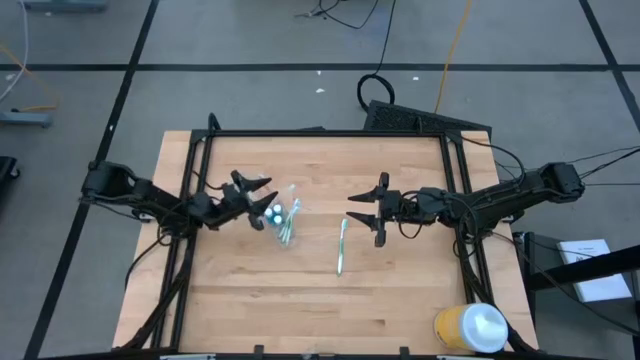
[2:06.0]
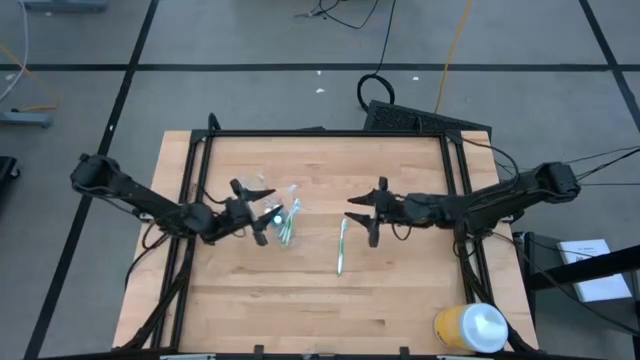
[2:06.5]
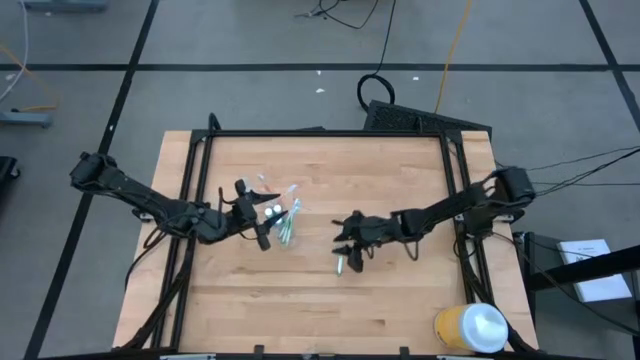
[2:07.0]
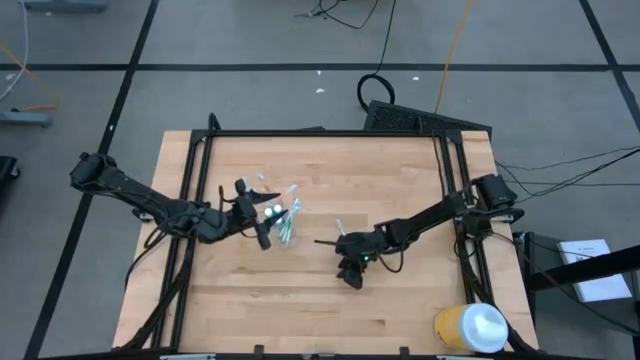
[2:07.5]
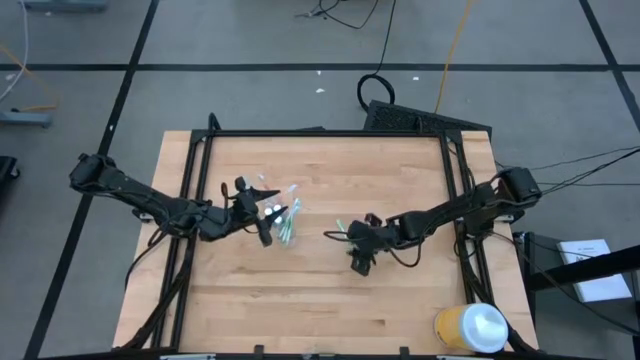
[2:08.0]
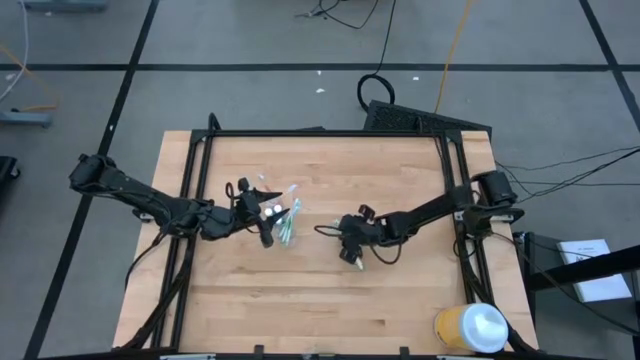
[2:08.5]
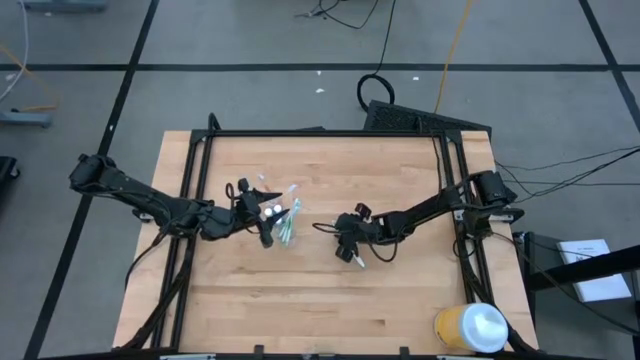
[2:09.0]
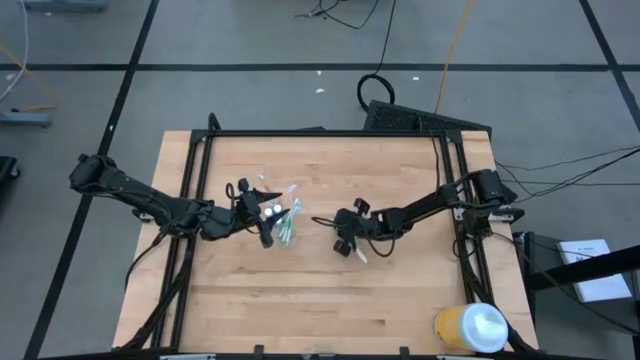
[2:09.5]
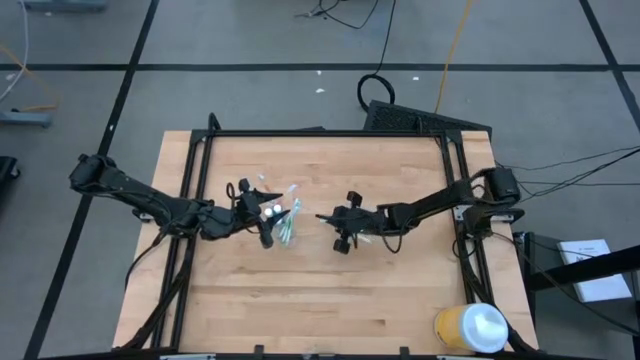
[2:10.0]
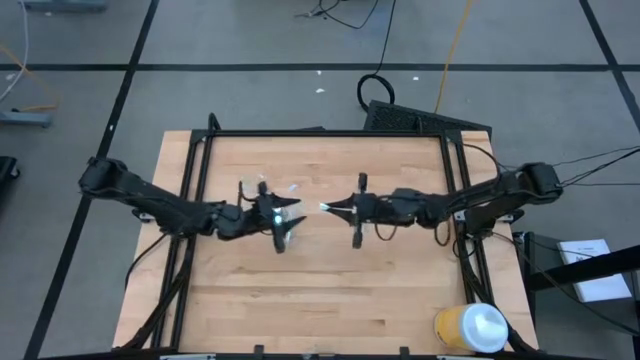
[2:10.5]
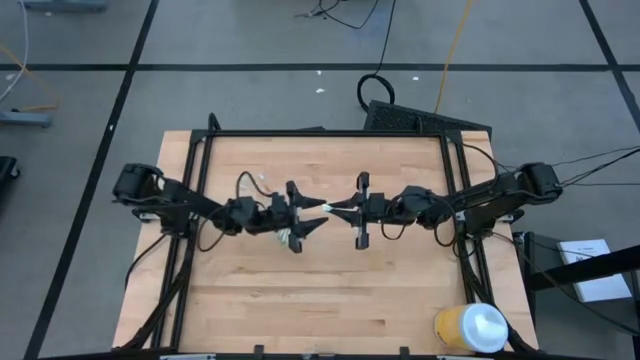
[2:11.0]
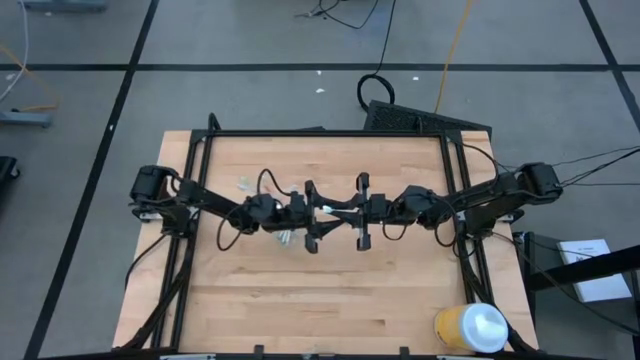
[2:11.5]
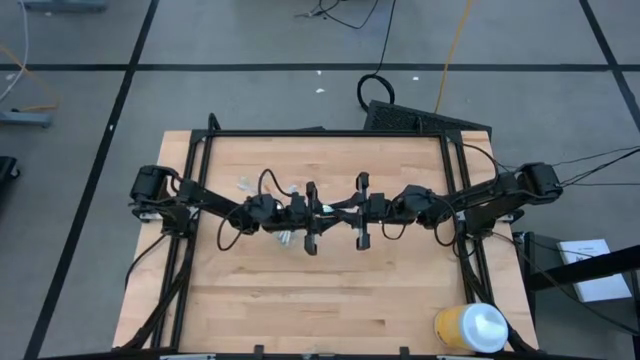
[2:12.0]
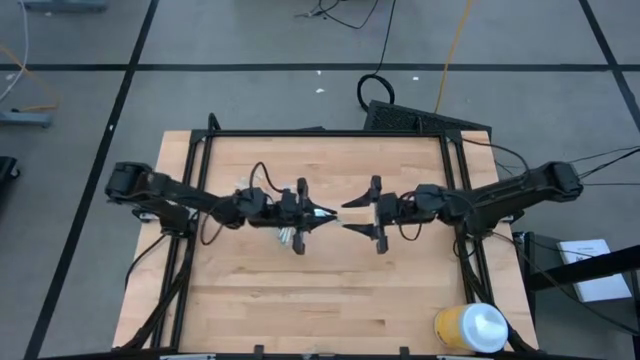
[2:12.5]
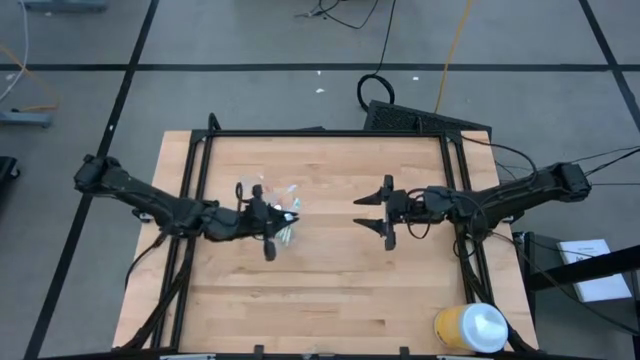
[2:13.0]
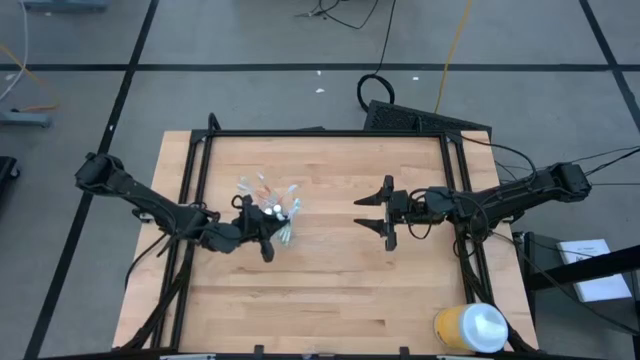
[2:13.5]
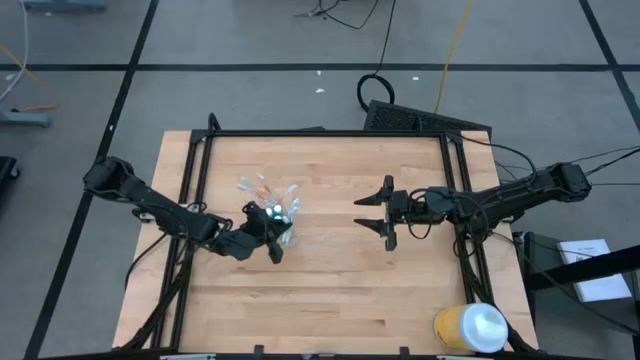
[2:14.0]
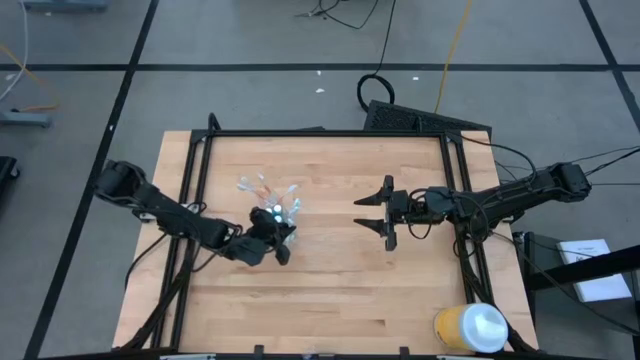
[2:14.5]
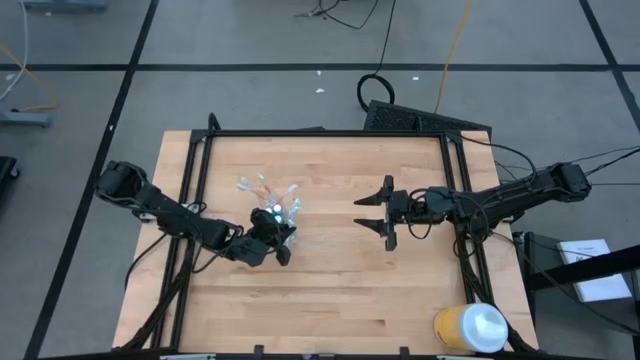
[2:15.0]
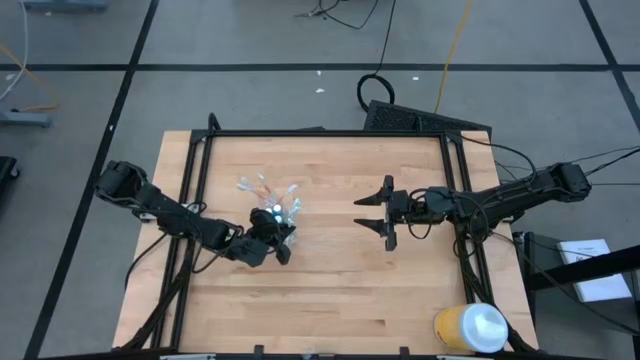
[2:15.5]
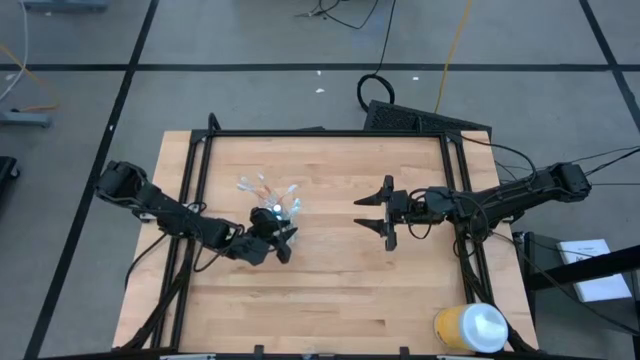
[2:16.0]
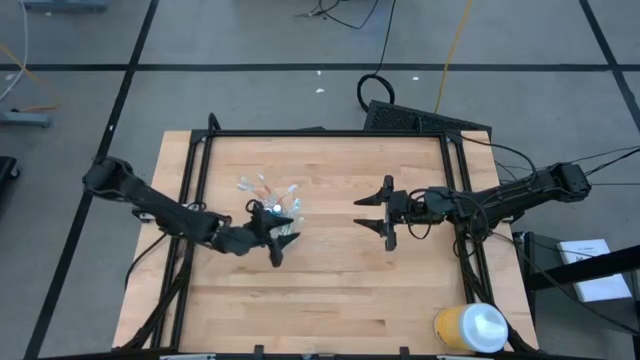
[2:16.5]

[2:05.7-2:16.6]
Task: Pick & Place toothbrushing station
Put the green toothbrush in the transparent organizer

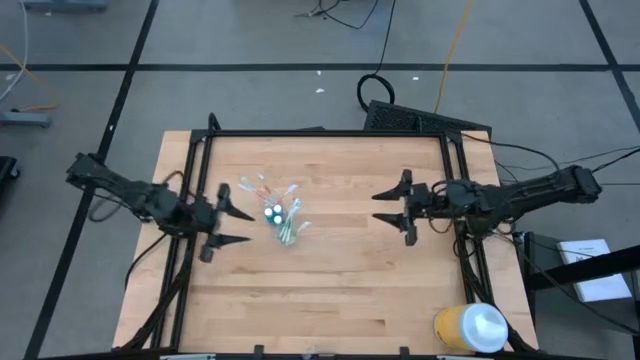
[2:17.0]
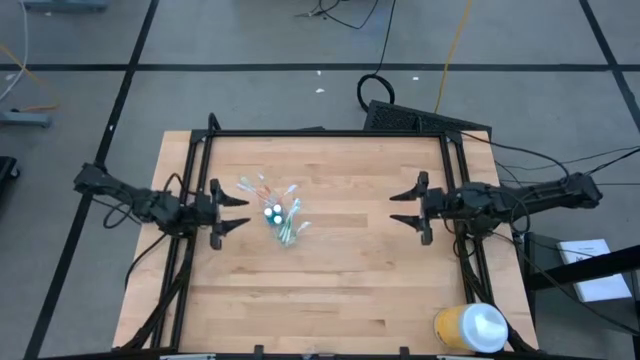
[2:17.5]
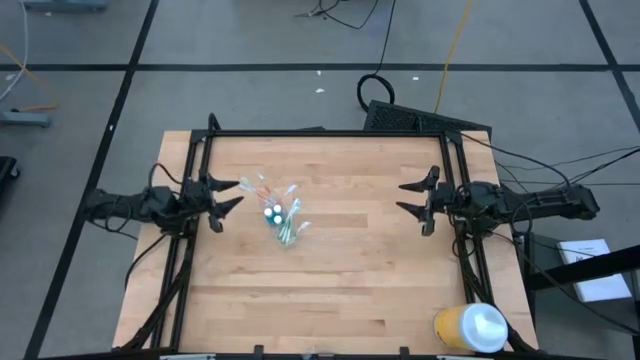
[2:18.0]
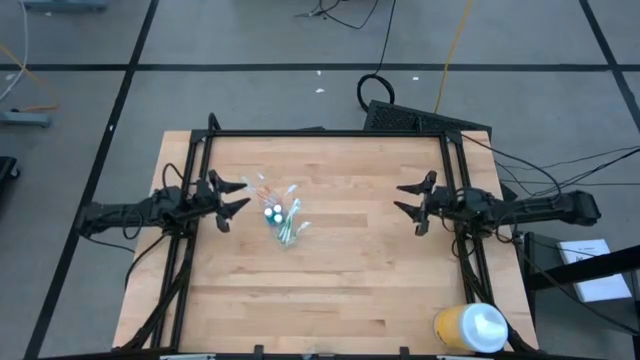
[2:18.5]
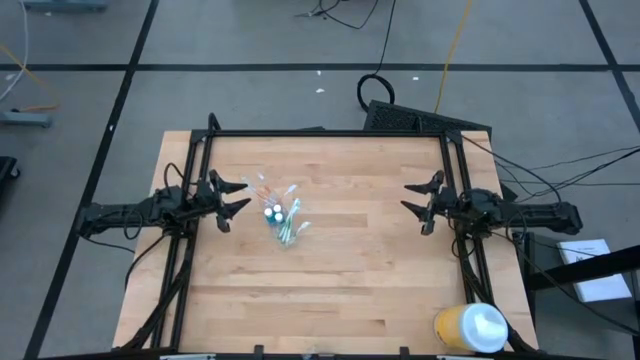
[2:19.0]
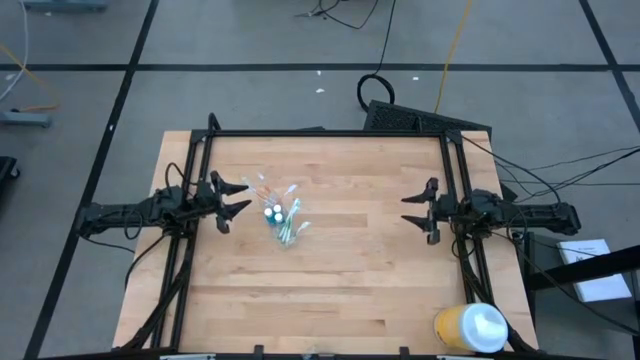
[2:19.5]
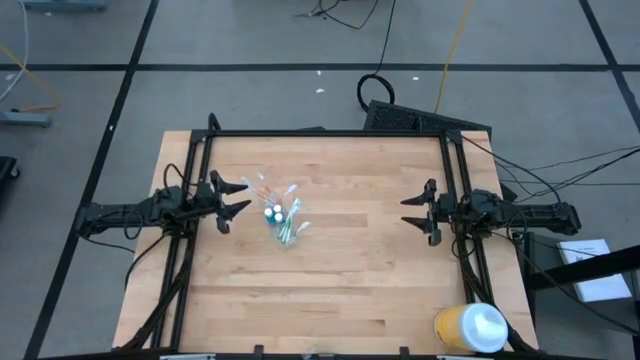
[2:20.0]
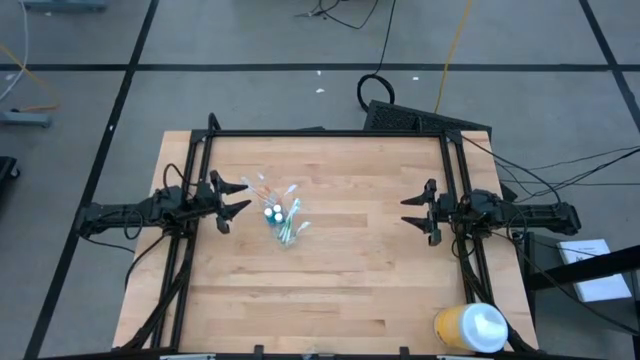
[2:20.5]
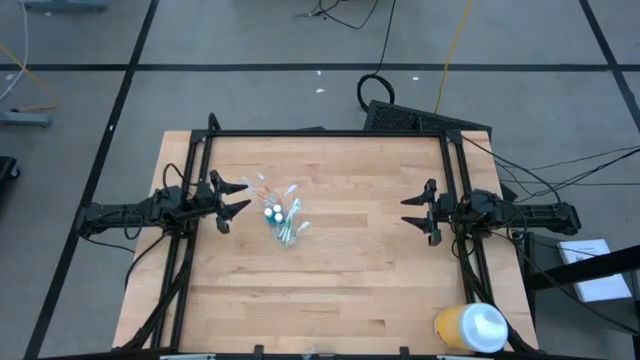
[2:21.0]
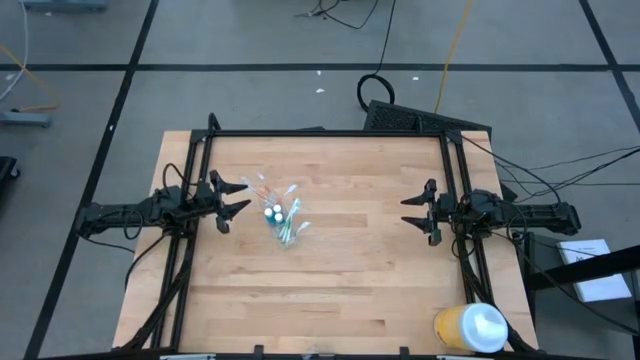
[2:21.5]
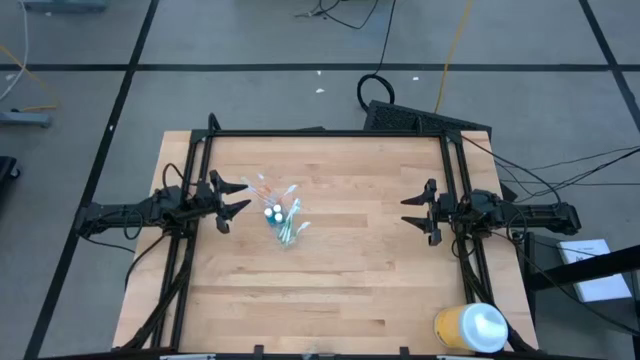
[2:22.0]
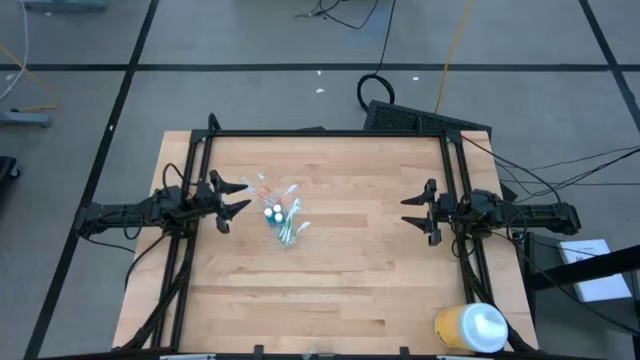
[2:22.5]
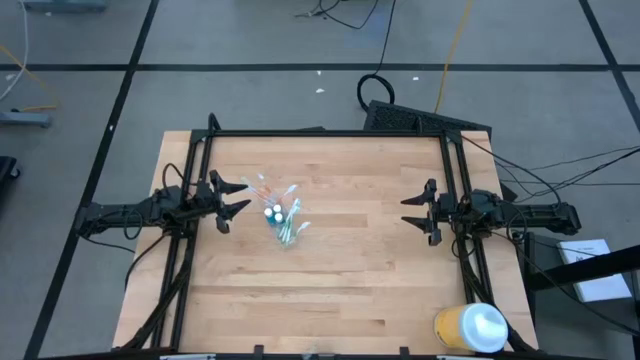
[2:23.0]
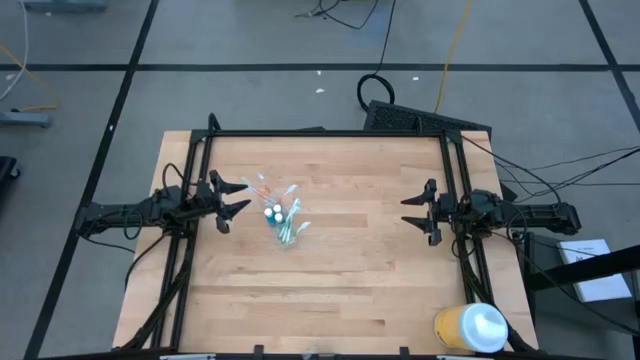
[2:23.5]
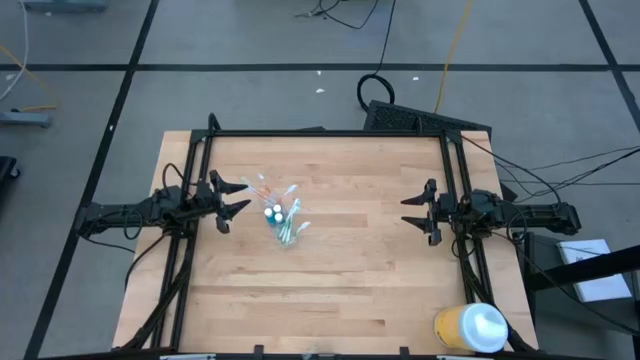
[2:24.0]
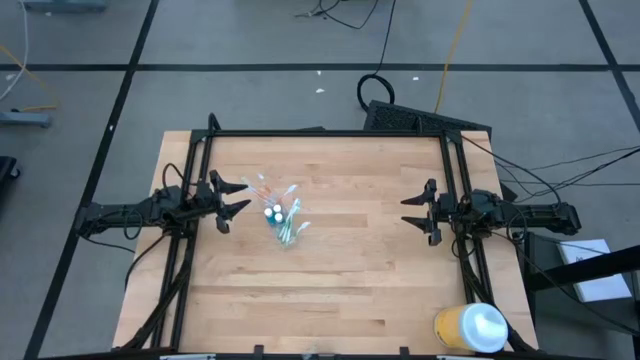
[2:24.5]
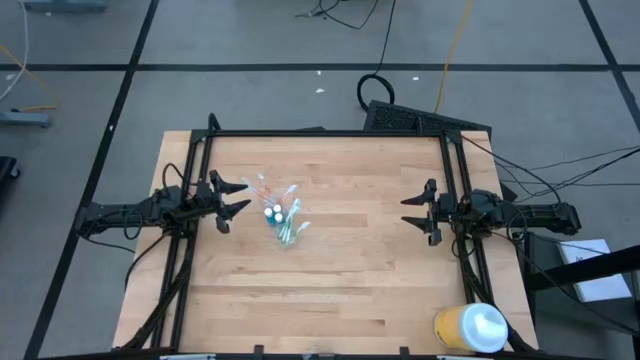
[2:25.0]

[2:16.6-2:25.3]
Return to home position

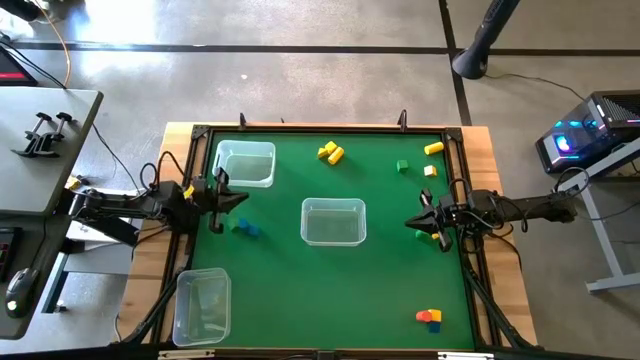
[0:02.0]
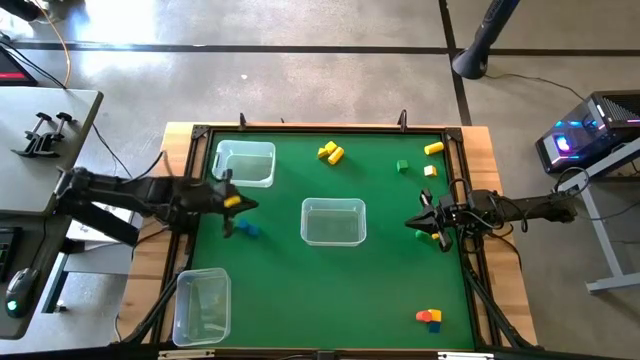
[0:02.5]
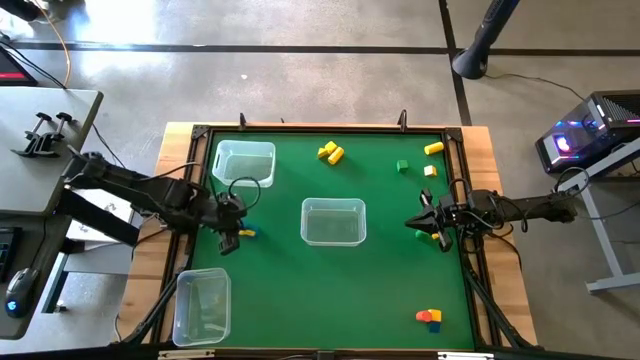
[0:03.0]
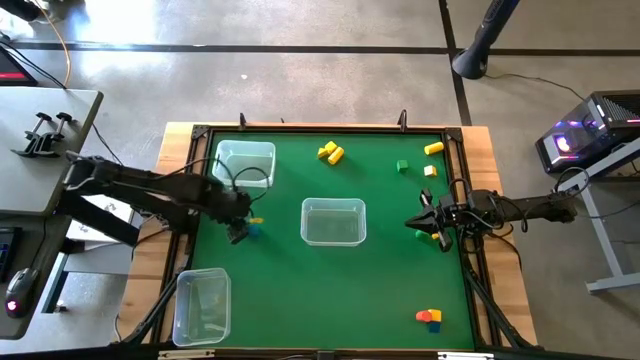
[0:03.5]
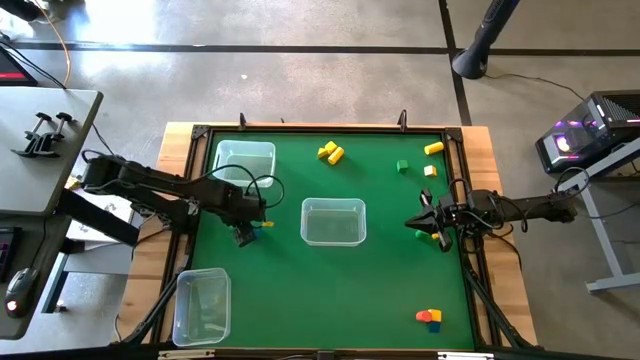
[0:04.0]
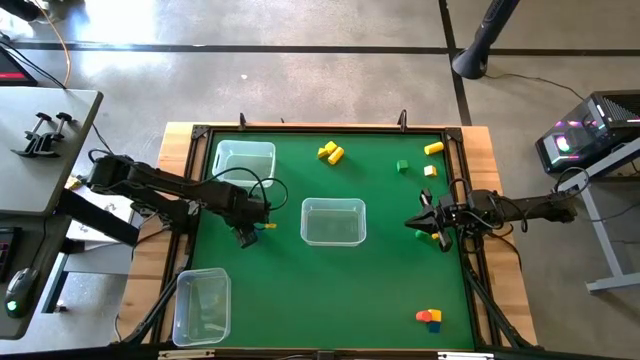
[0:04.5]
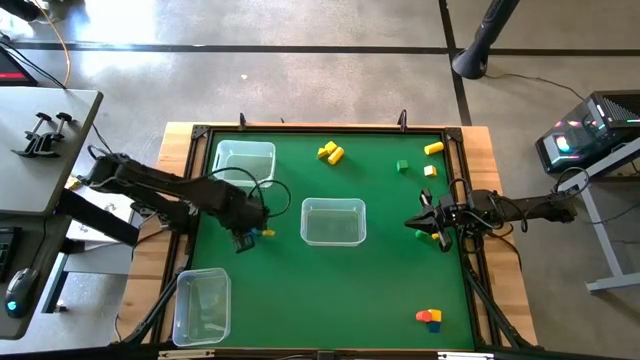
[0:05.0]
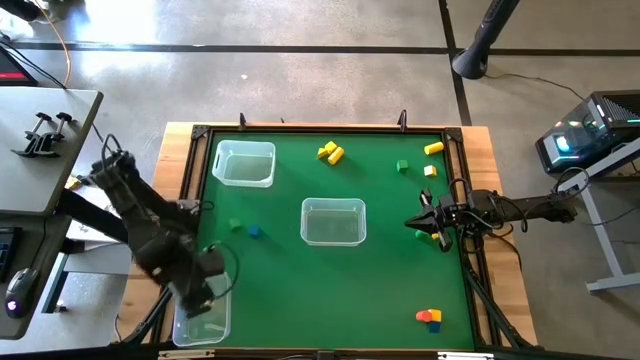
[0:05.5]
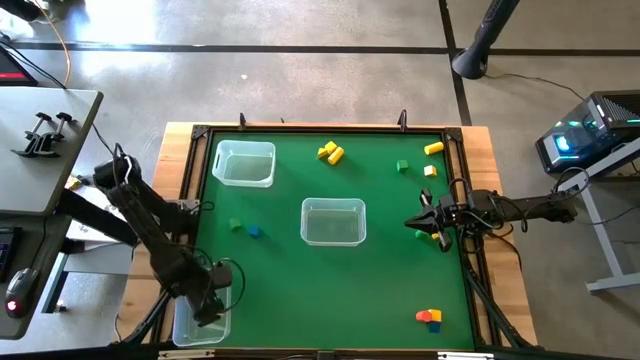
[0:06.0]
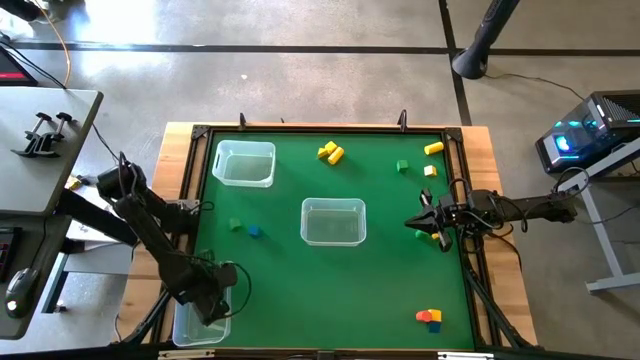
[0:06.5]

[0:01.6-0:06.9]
Task: Sort blocks by size
Put the blue cylindrical block into the bottom left transparent bin
